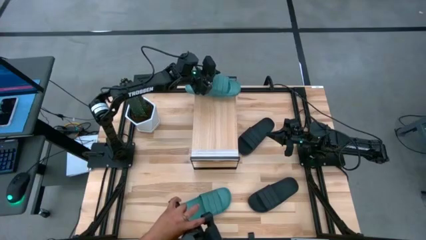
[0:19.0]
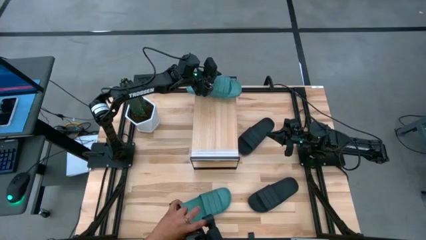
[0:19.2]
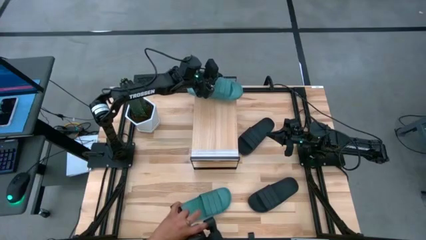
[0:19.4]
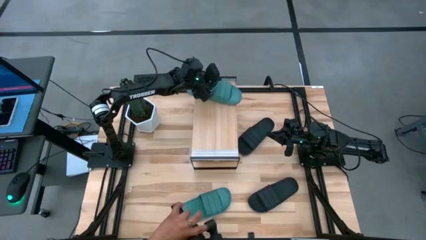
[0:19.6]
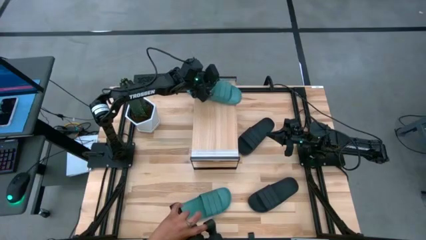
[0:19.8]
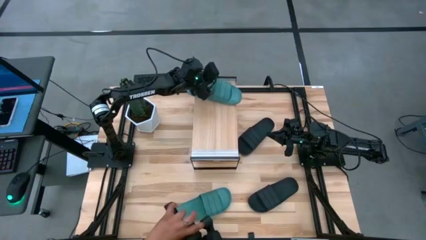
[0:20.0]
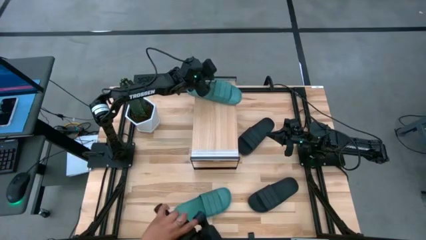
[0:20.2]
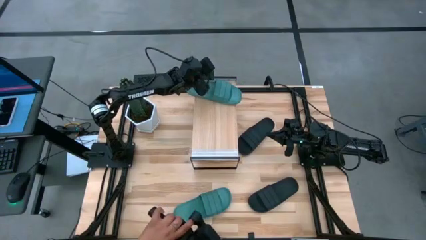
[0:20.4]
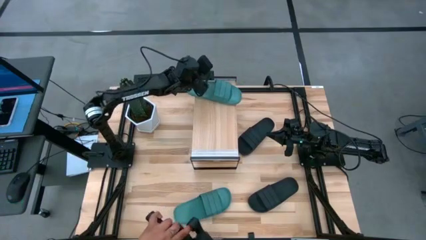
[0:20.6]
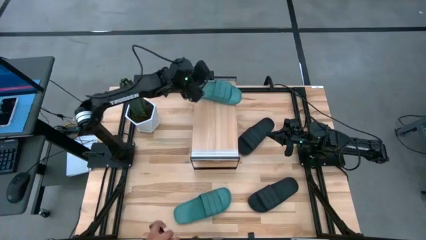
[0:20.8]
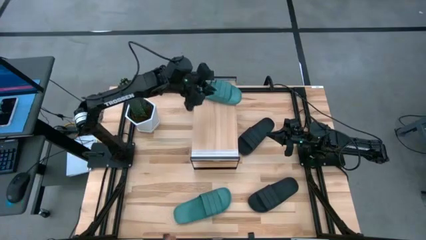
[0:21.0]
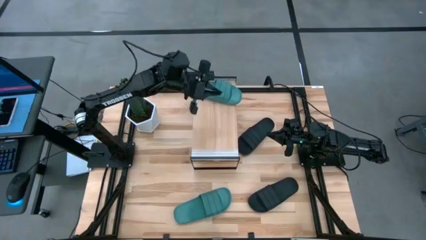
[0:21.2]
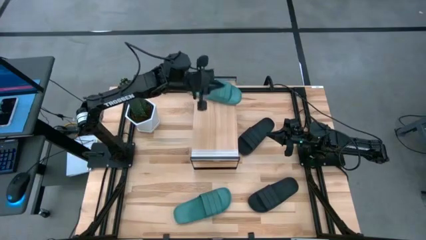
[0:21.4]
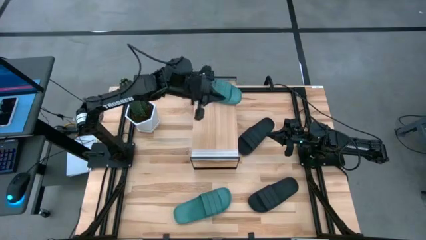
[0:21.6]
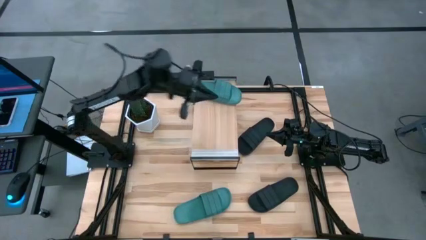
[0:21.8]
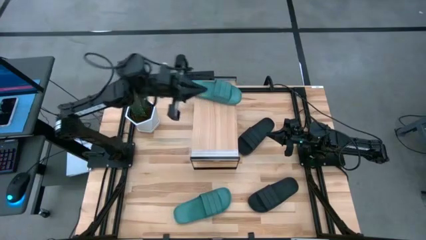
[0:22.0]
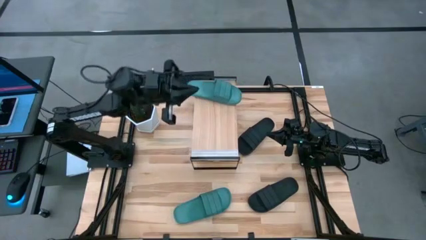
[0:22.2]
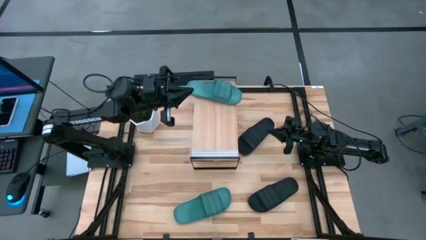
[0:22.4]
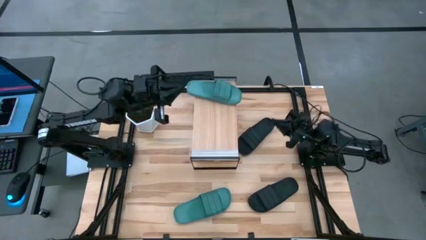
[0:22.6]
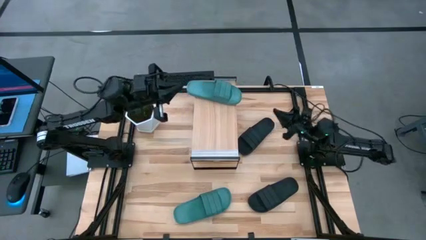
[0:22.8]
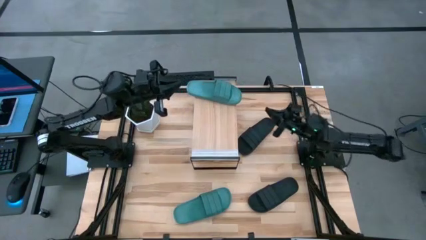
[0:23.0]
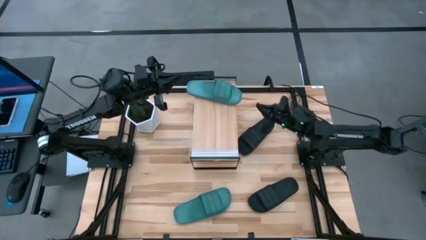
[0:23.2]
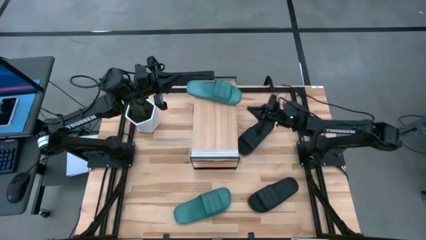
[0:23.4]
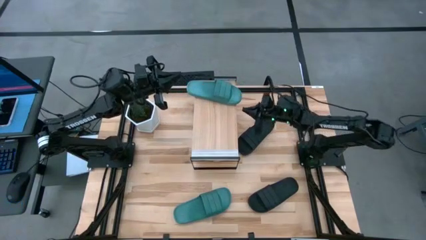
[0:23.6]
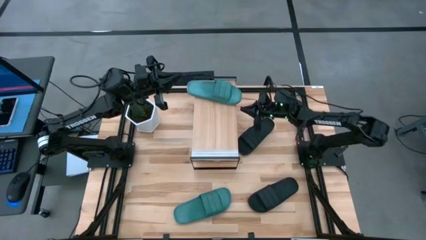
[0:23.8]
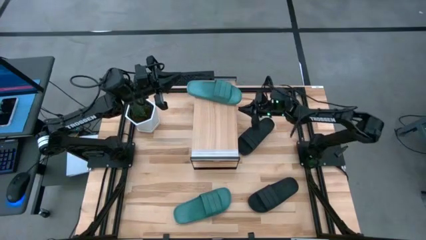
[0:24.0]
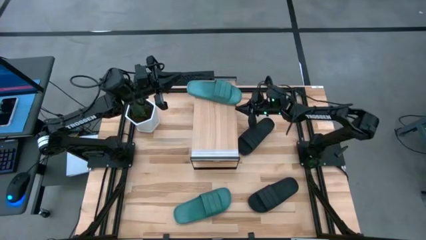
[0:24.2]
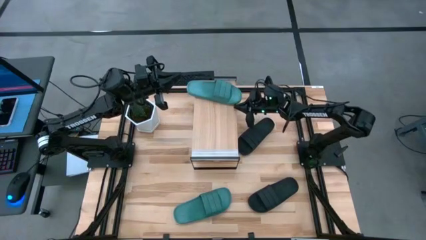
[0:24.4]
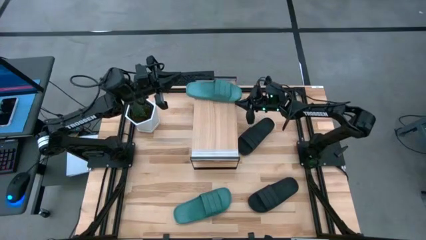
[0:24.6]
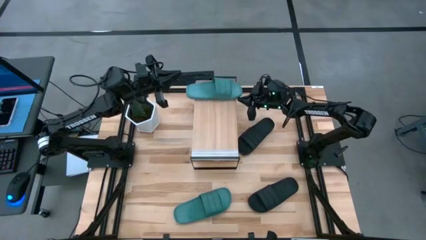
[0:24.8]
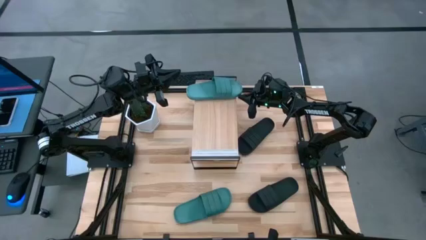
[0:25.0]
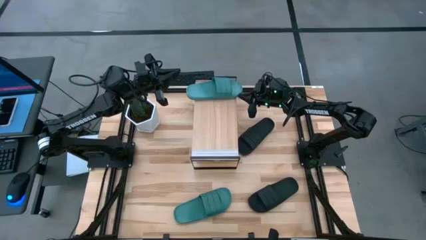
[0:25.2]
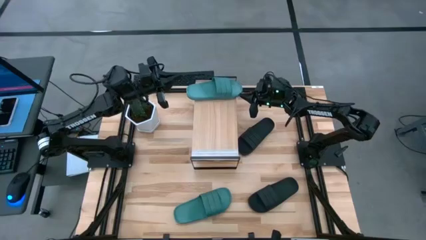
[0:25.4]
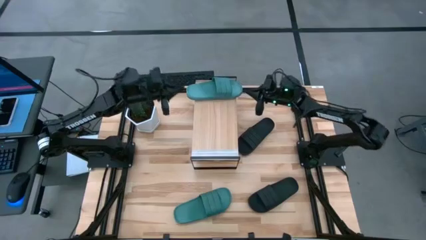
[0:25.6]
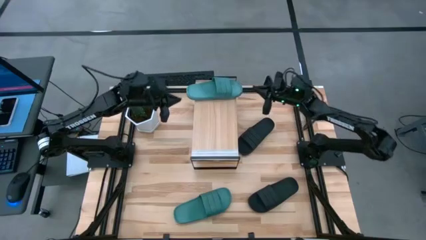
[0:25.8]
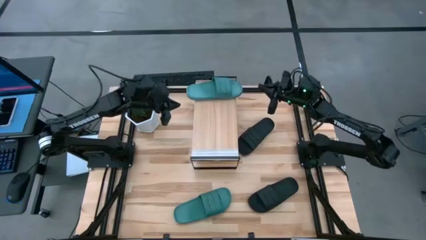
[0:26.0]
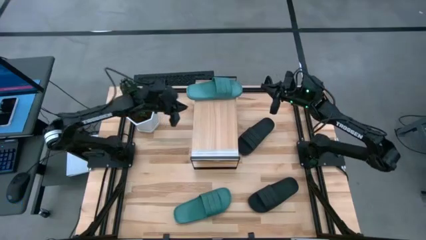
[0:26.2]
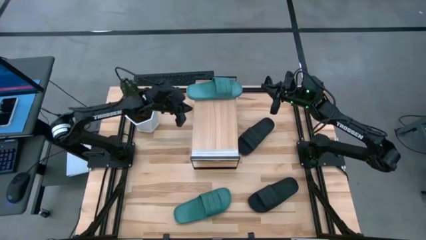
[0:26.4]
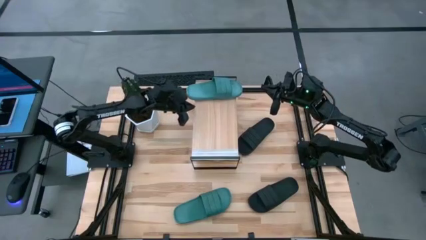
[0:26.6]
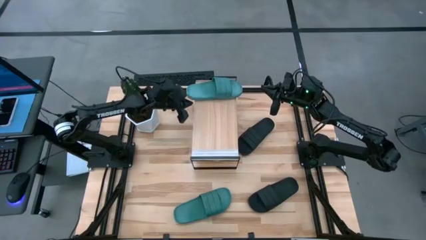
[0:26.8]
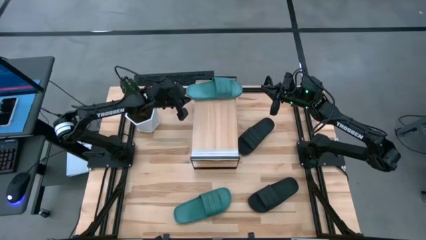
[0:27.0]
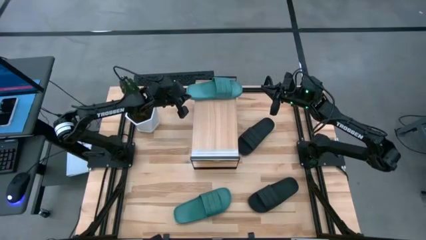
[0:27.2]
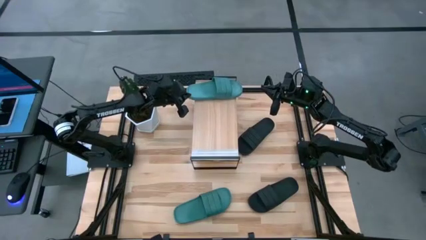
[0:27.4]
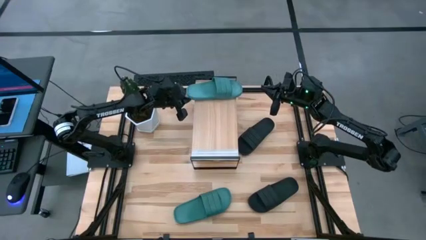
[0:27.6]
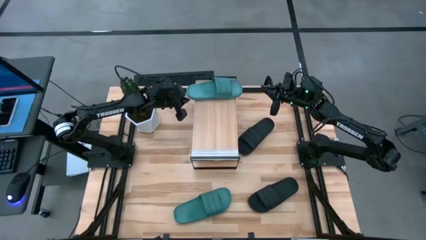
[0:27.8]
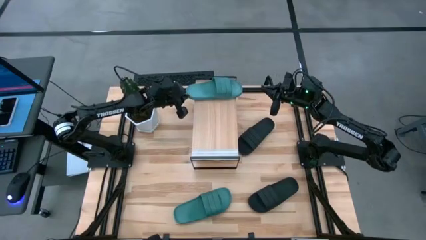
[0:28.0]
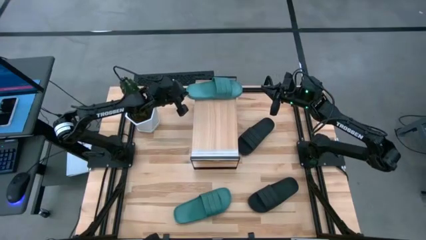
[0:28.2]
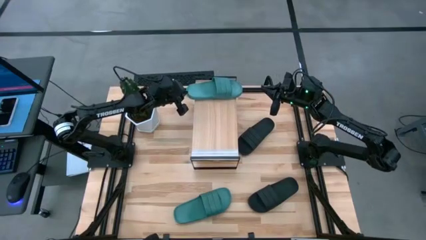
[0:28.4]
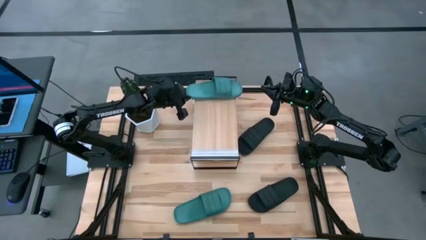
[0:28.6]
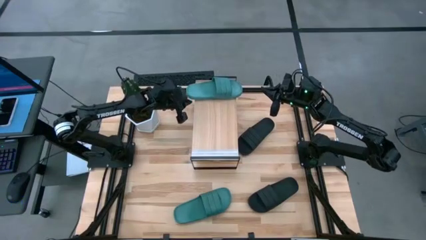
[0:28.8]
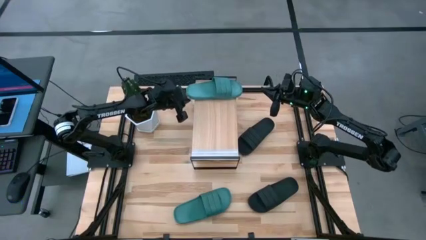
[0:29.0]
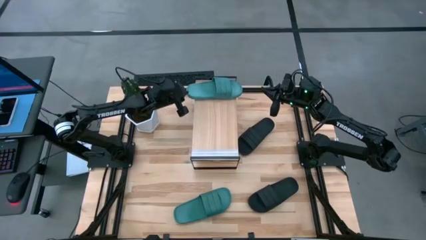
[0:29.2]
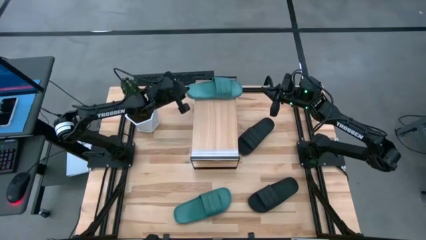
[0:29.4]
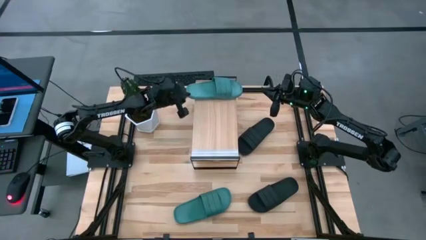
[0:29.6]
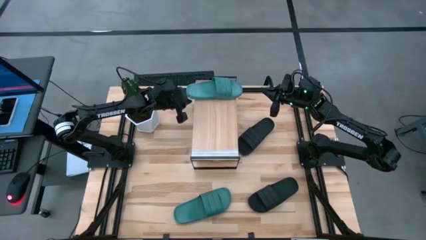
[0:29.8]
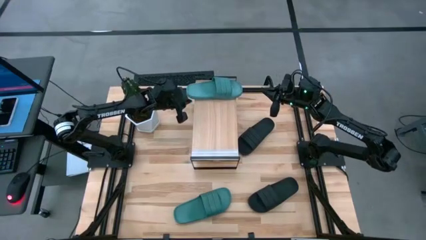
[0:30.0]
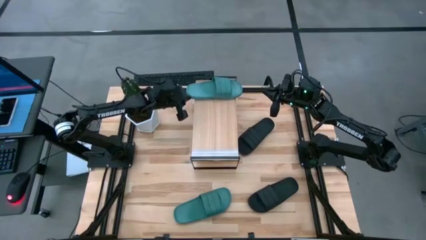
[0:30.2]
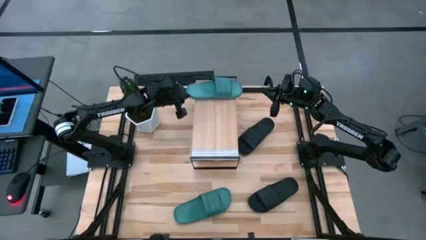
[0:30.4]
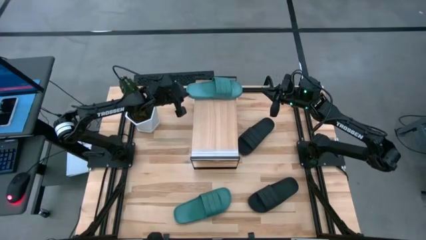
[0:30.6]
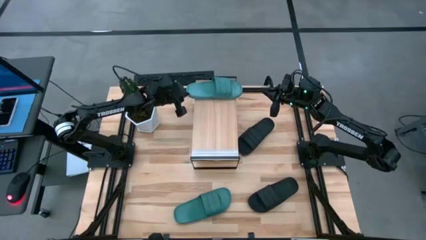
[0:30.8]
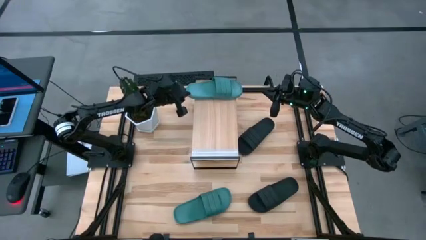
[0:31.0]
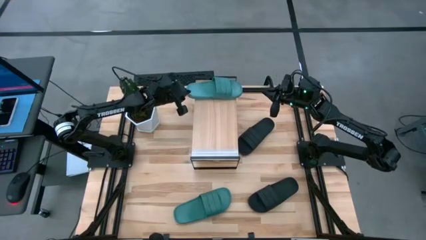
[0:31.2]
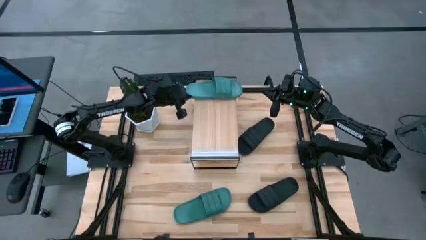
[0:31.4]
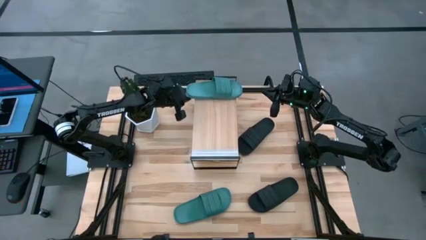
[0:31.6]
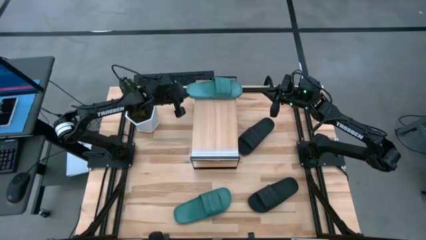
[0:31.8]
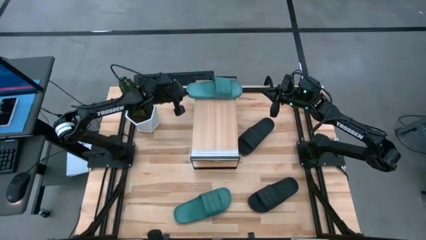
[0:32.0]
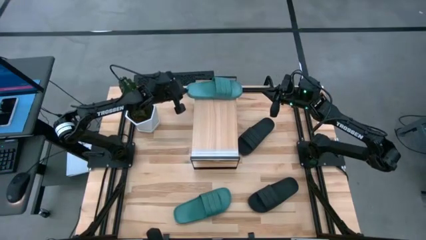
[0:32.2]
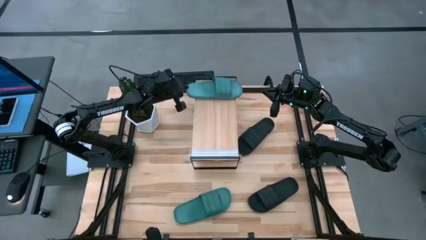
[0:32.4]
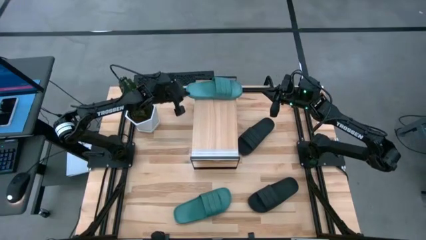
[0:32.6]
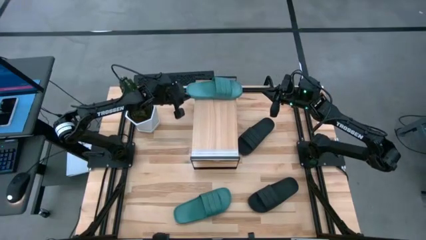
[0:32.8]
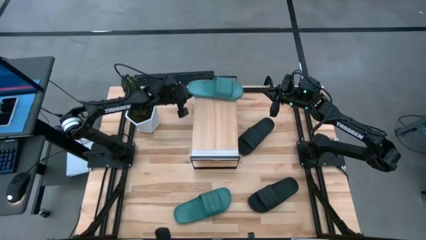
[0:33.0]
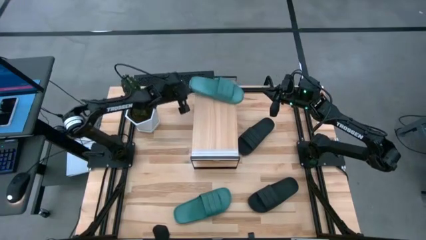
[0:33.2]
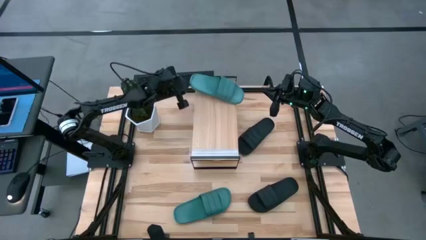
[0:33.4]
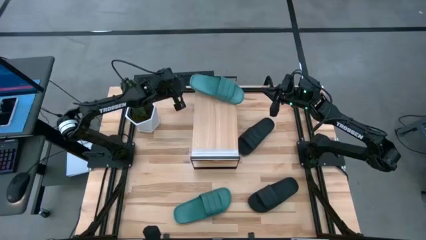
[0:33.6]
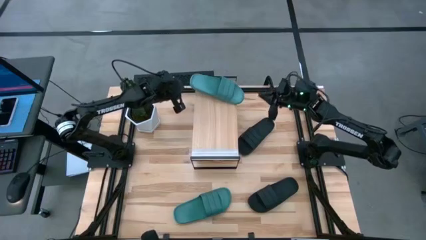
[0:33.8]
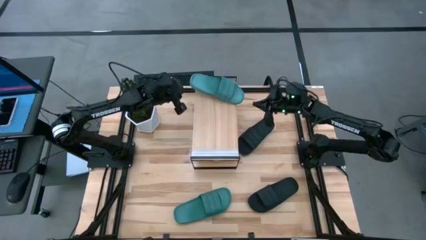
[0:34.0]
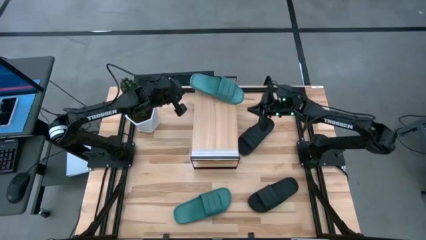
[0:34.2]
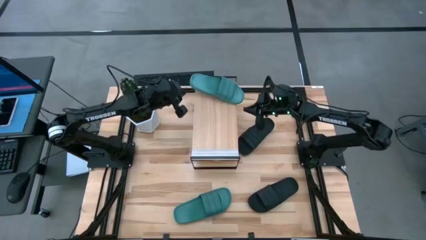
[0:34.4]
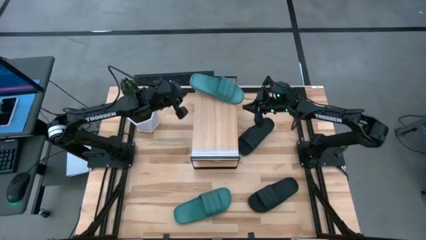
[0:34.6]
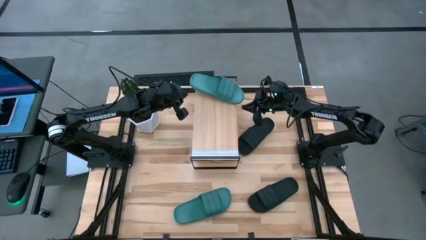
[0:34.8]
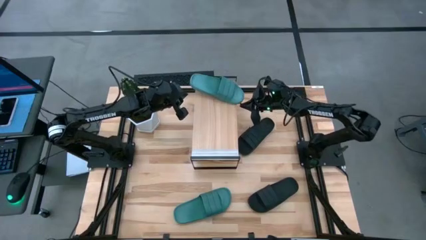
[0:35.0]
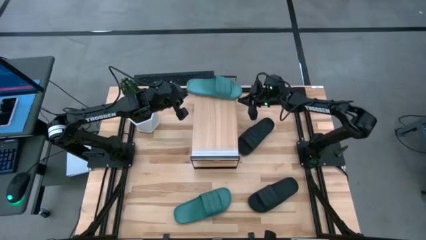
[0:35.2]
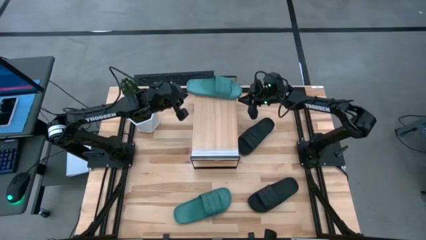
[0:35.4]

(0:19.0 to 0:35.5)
Task: Pick and place slides into the shelf
Put the top green slide on the shelf
